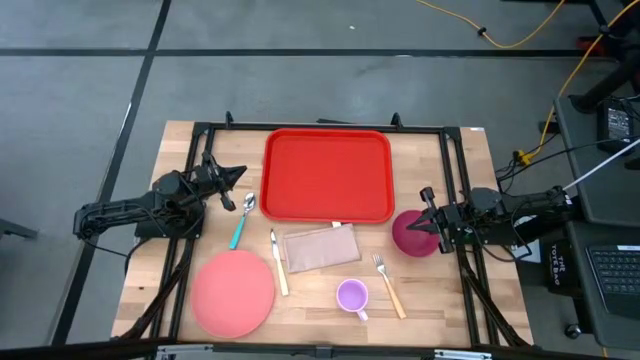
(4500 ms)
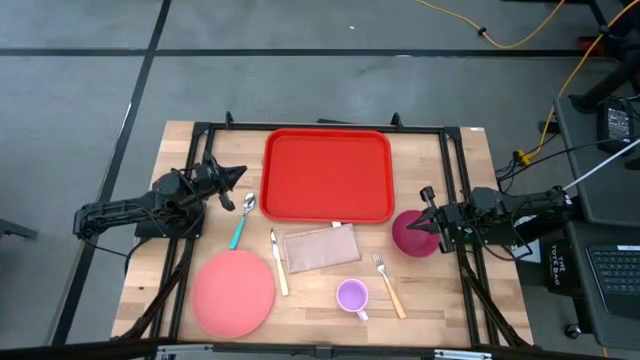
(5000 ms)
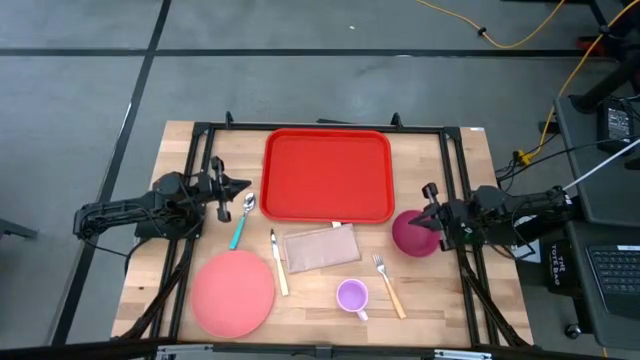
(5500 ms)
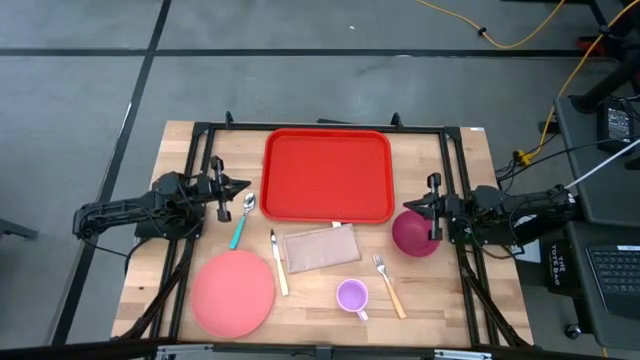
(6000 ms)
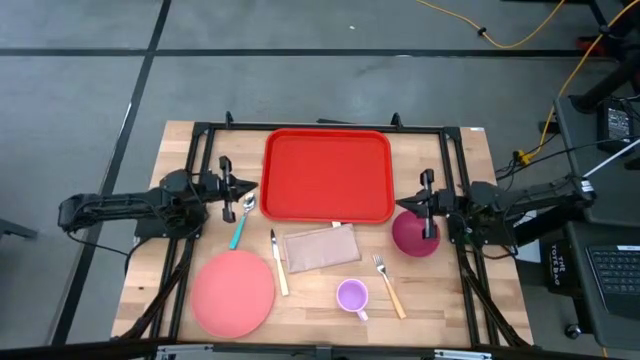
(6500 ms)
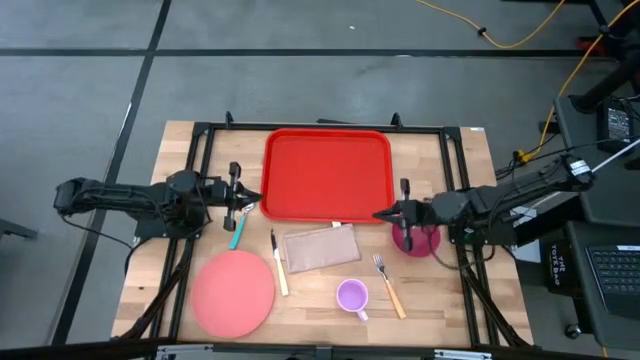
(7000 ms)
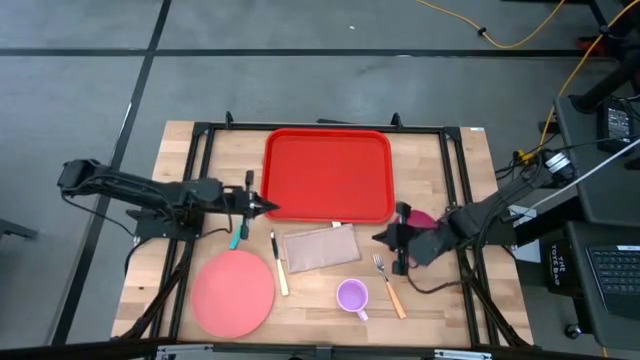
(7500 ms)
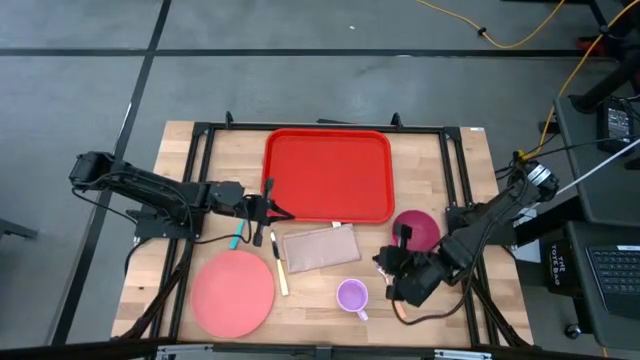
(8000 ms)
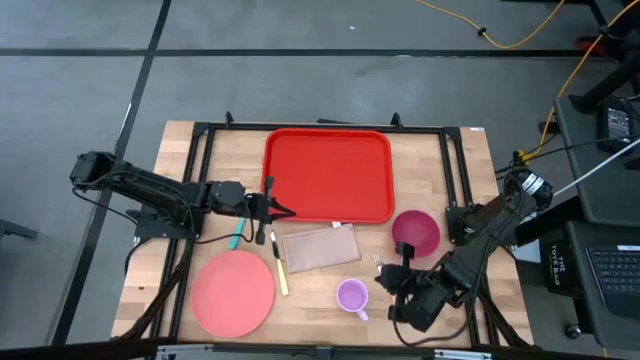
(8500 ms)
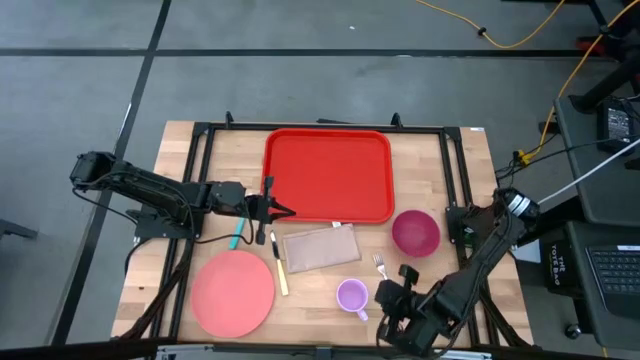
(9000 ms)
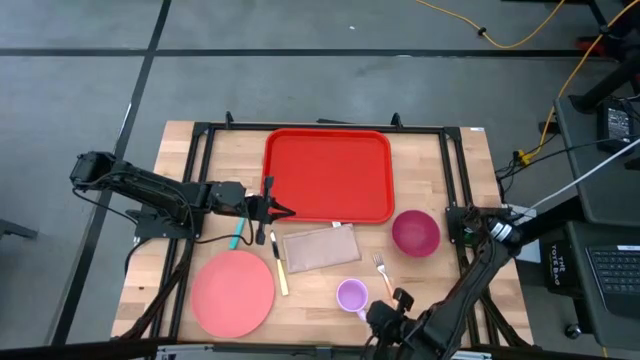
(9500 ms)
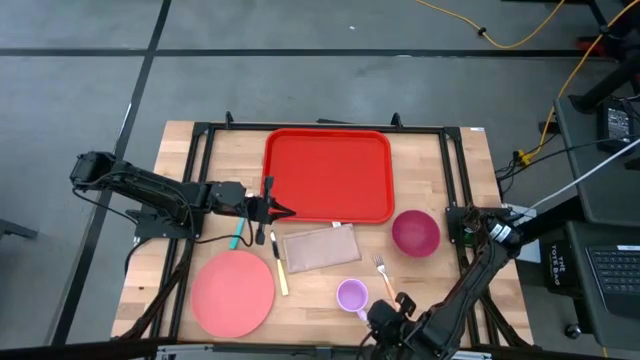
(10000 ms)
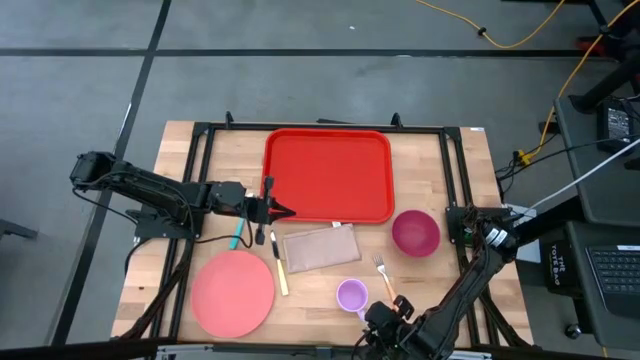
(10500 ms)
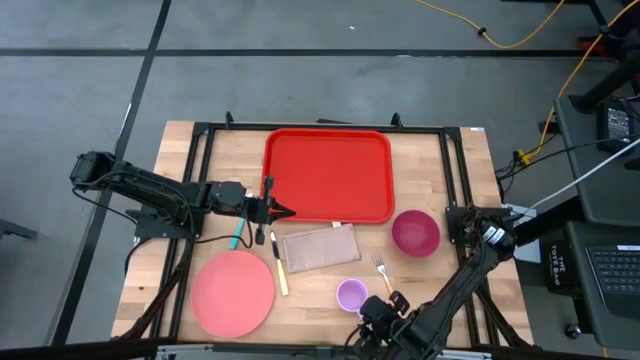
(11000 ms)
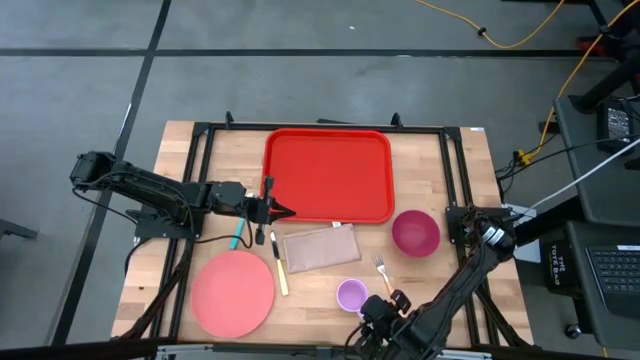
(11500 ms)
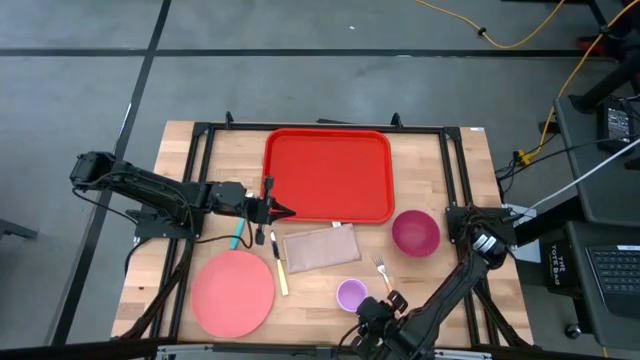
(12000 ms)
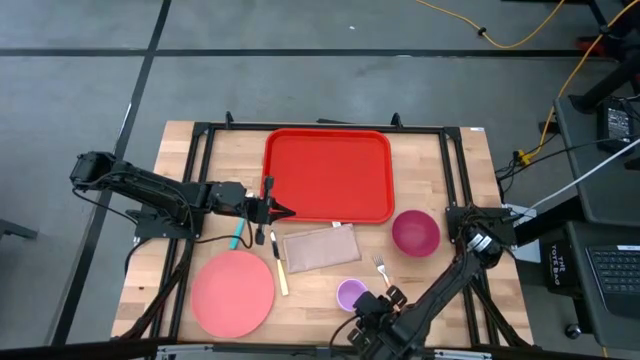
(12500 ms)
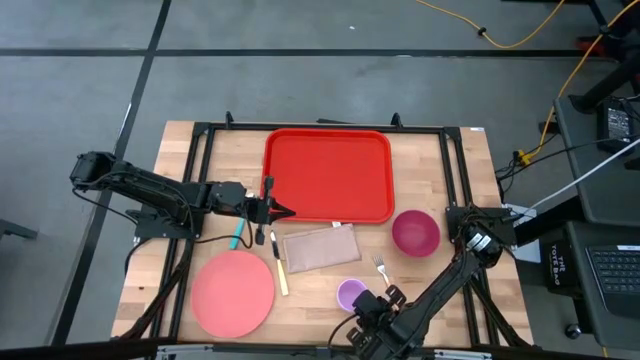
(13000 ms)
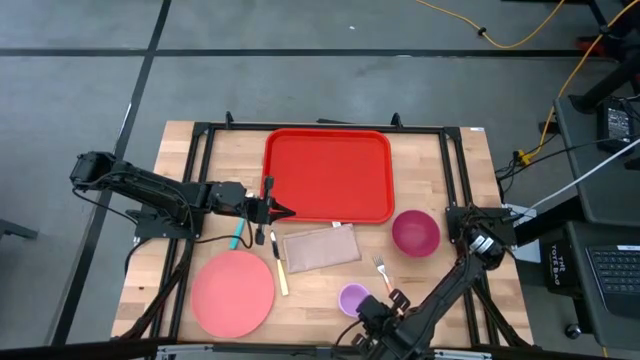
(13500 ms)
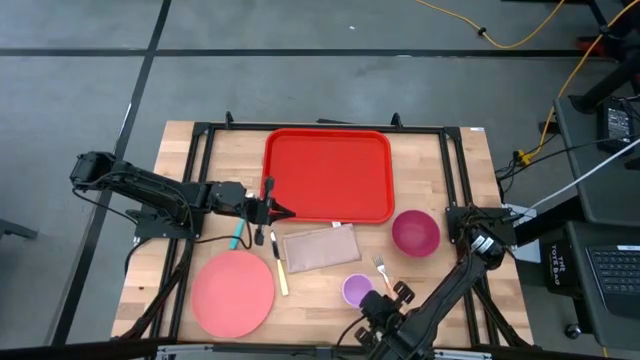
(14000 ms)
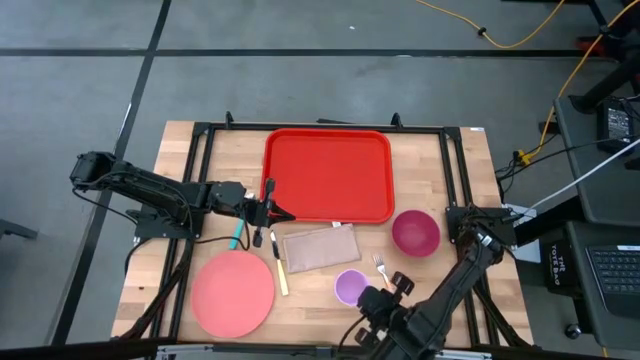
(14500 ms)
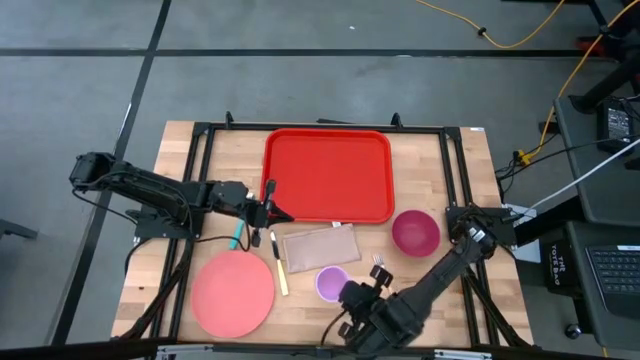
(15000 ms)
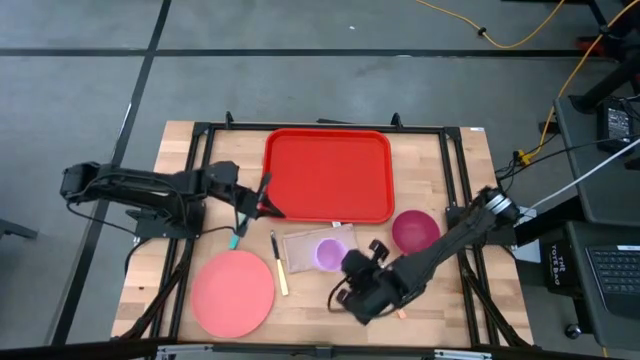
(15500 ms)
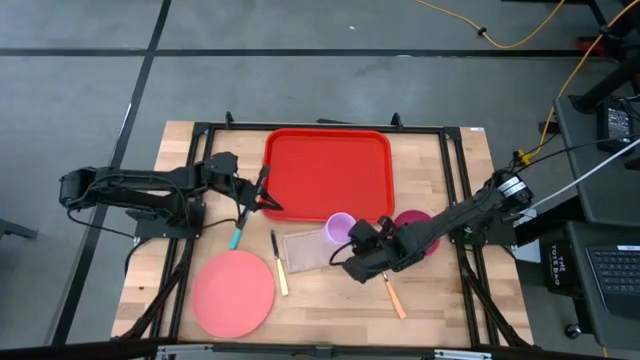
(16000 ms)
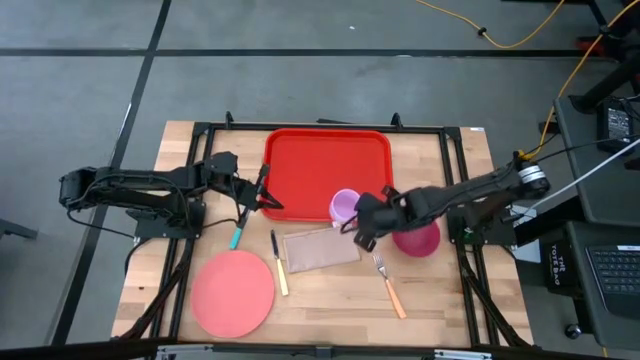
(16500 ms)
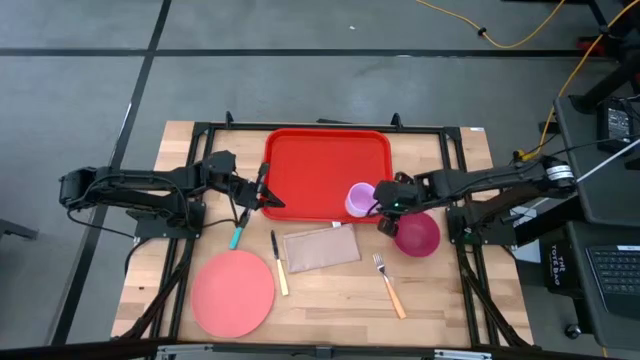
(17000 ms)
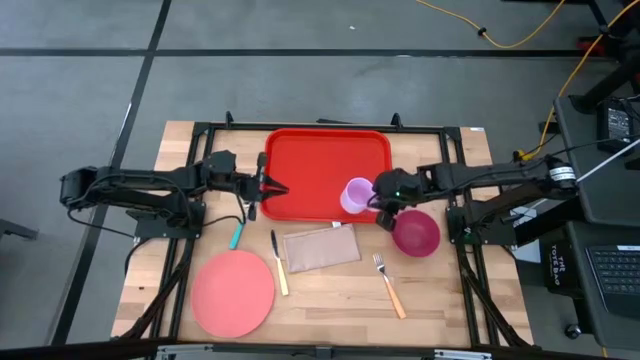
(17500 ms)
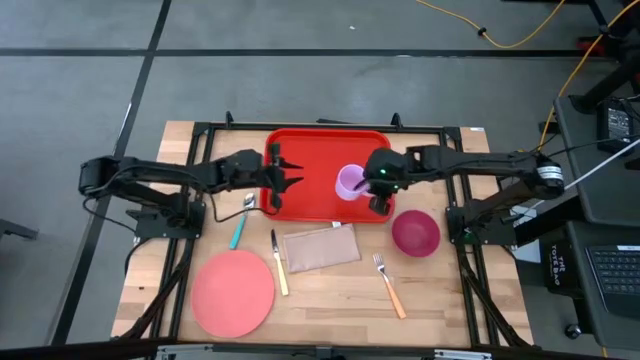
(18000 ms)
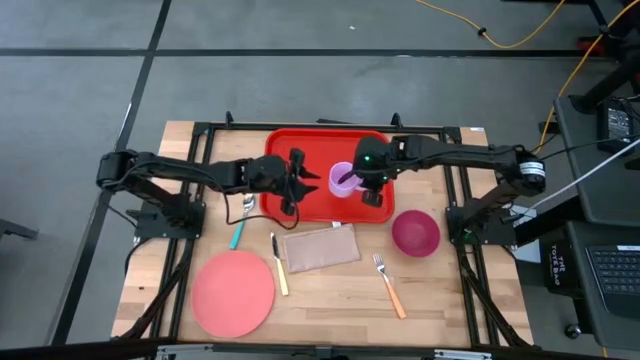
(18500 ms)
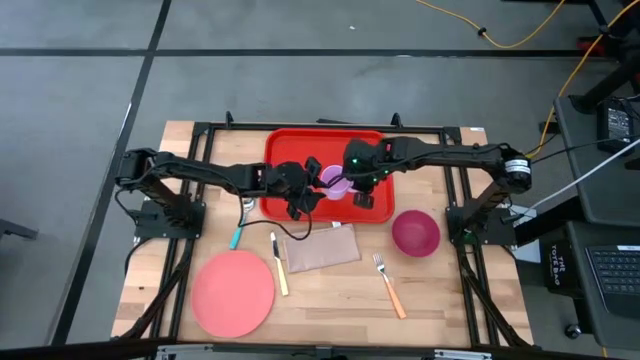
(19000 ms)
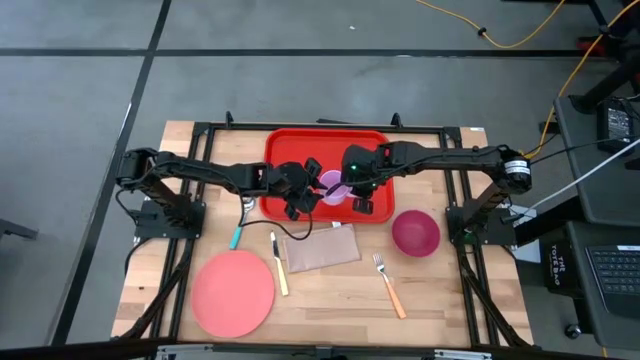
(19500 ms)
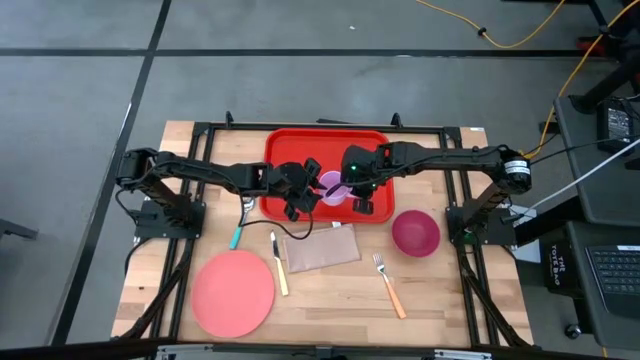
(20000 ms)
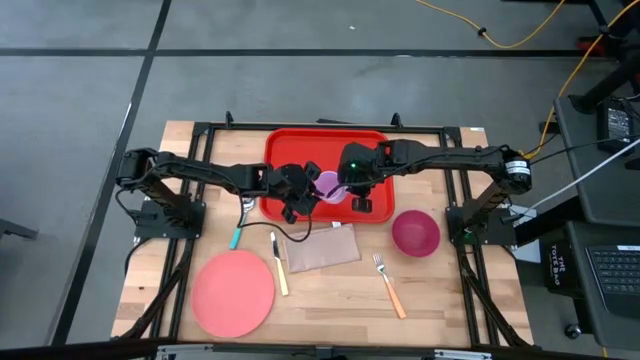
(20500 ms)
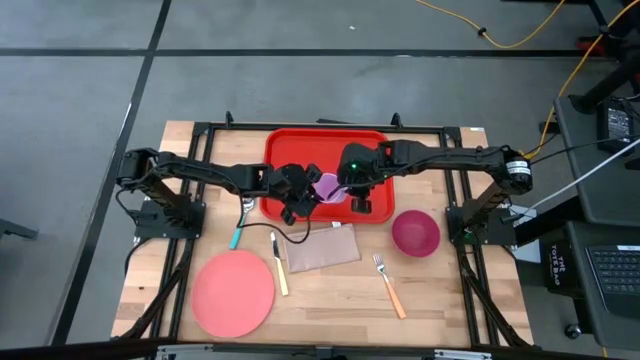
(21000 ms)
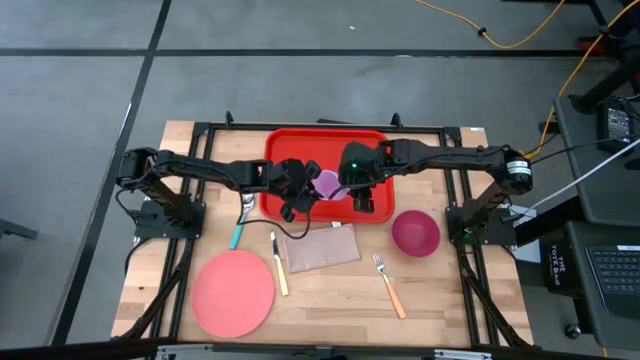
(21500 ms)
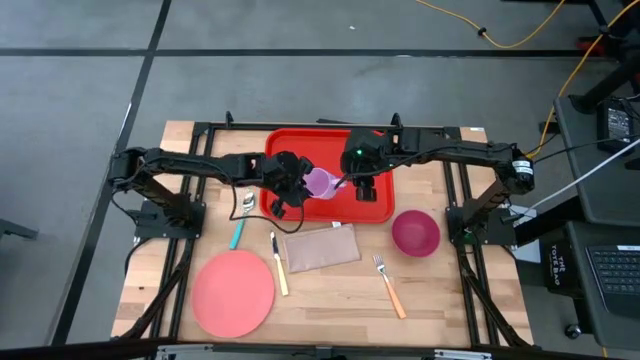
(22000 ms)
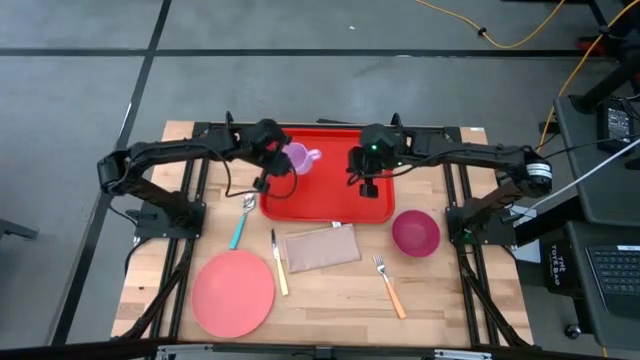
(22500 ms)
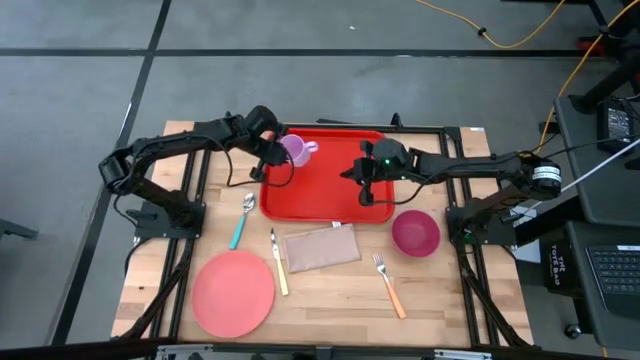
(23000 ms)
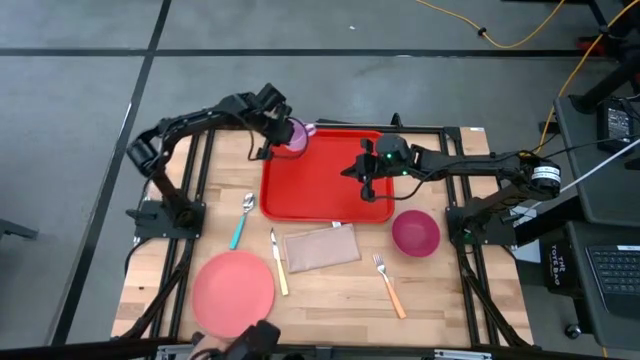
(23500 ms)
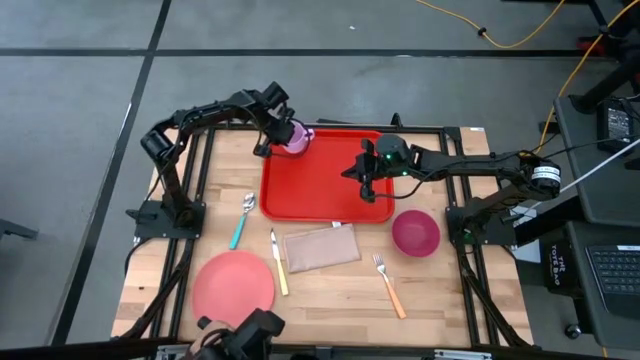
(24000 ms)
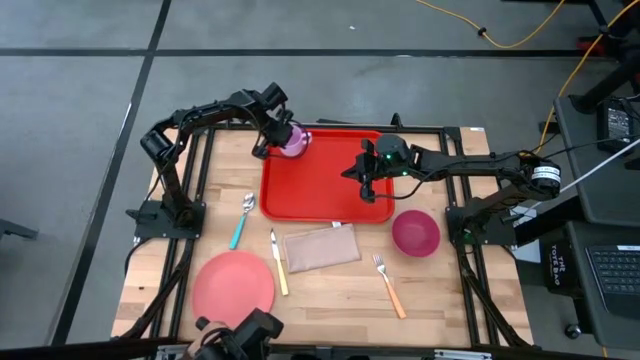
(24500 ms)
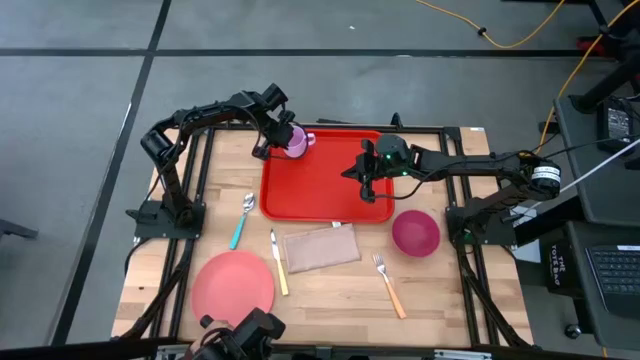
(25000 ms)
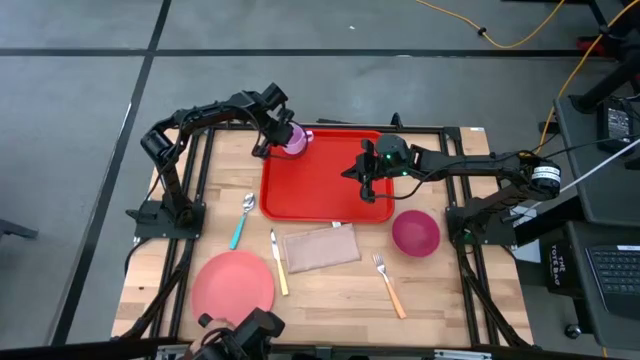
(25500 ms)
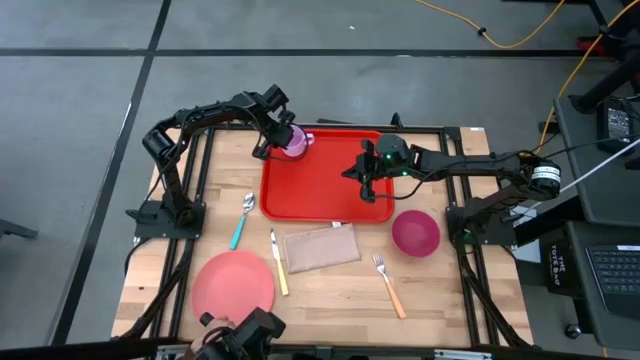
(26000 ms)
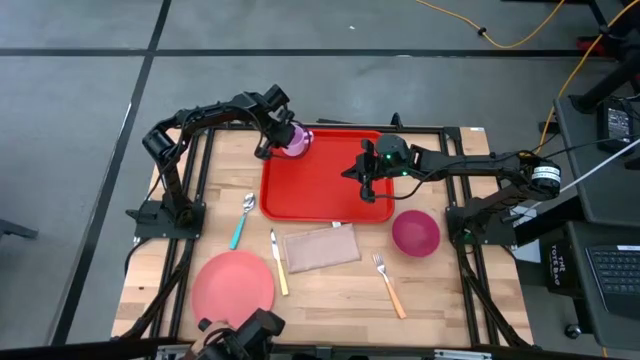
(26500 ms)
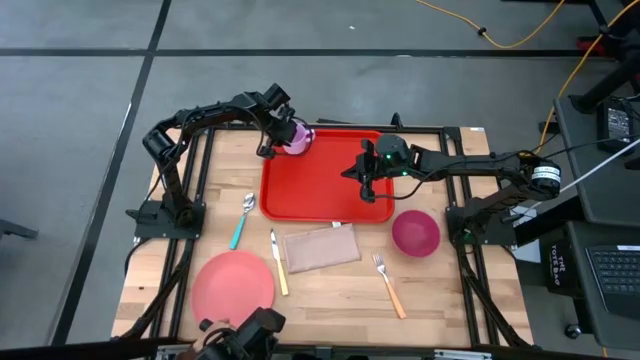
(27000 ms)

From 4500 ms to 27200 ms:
Task: Set up tray
Put the purple mug on the red serving tray
